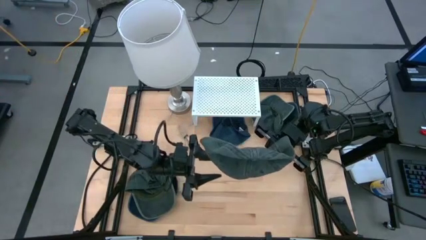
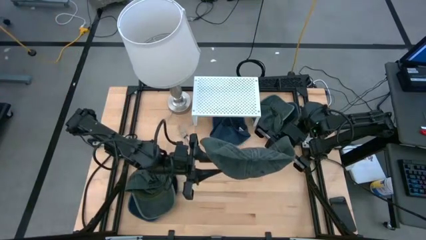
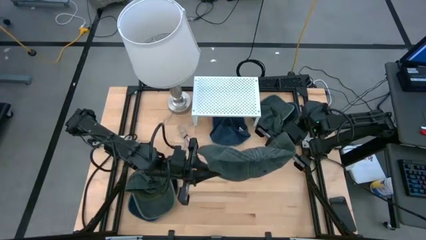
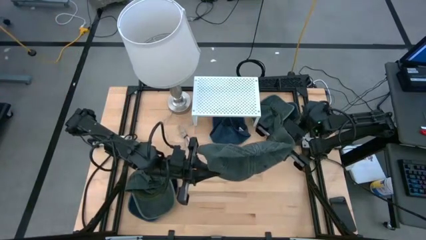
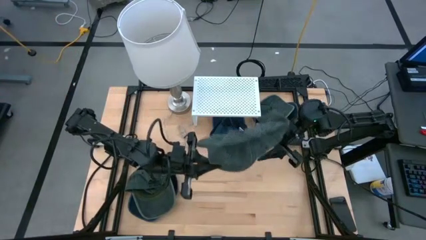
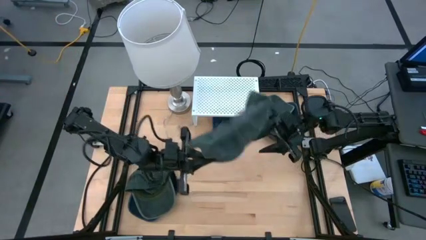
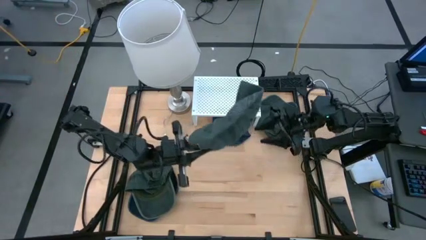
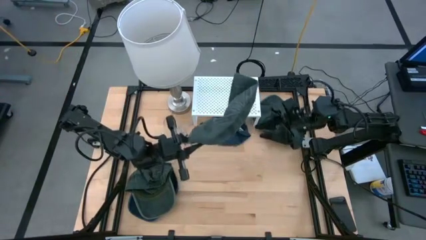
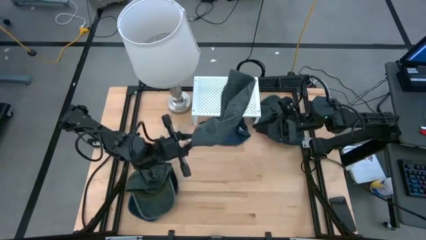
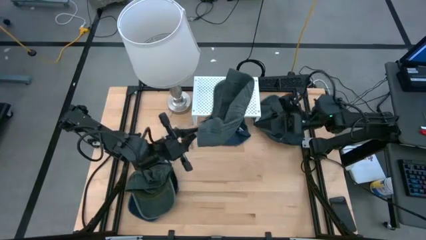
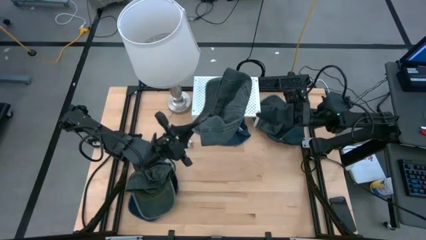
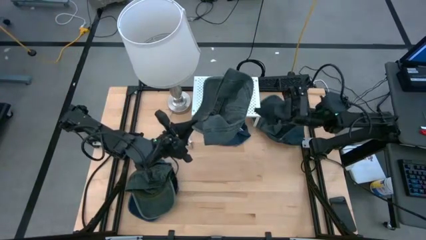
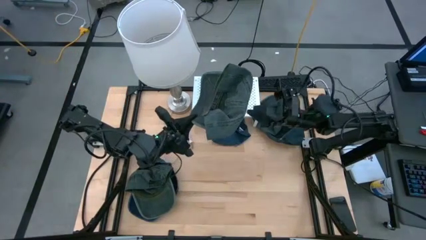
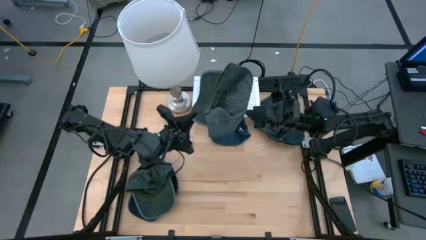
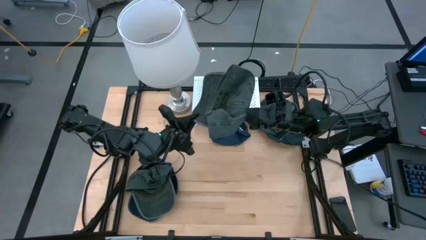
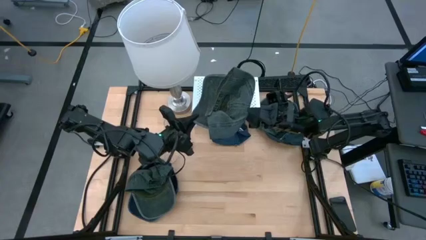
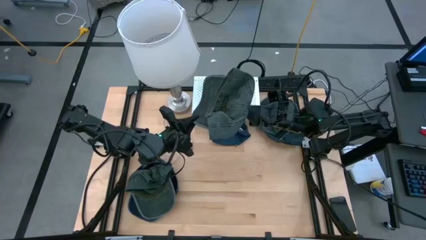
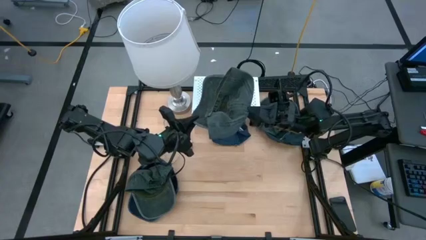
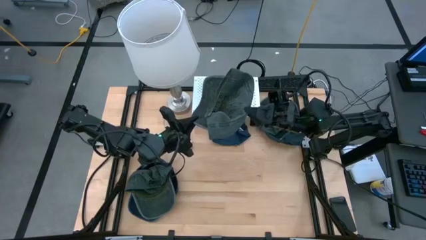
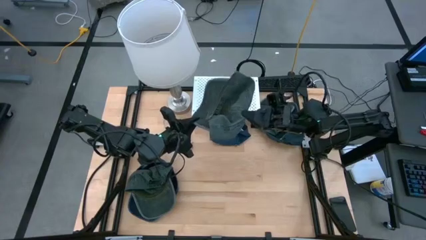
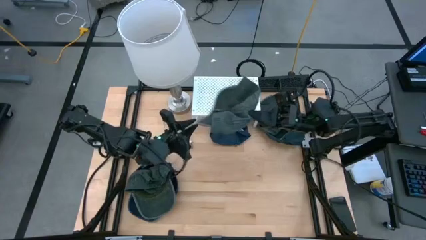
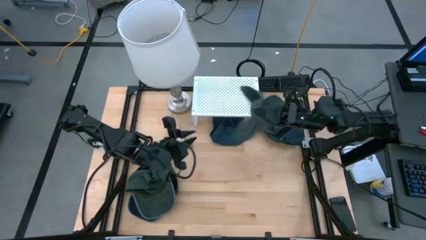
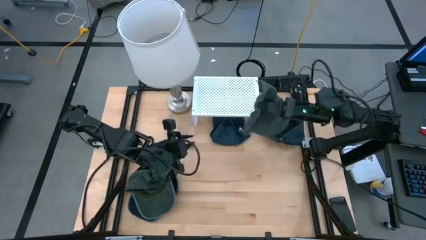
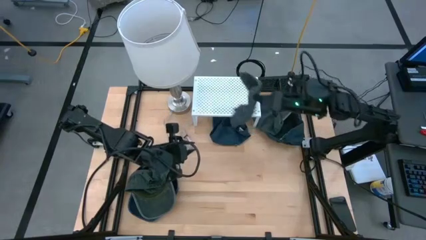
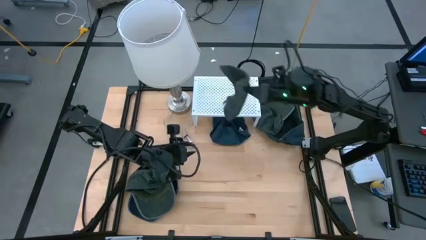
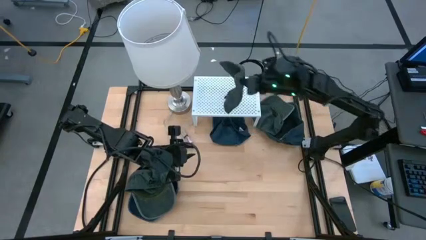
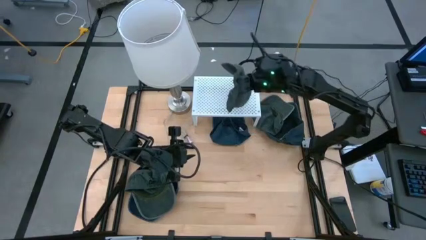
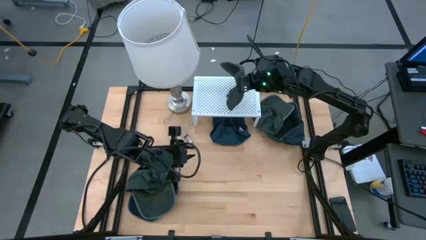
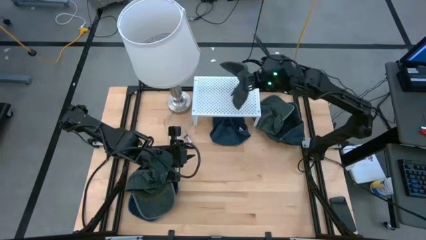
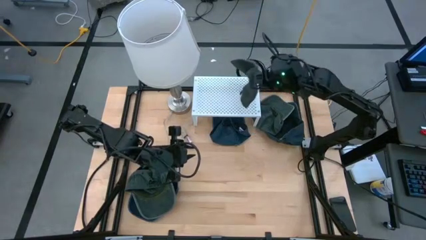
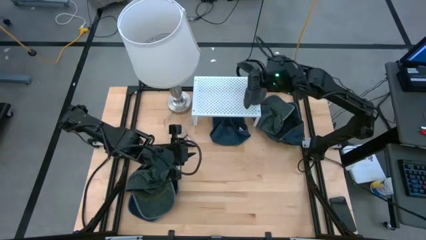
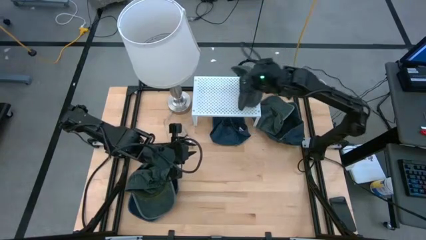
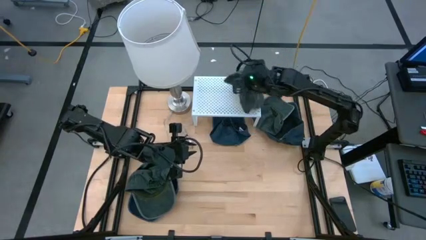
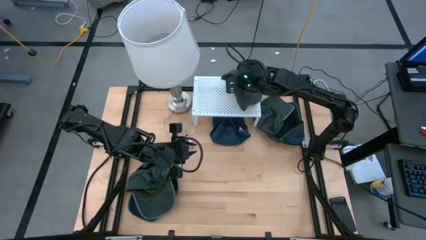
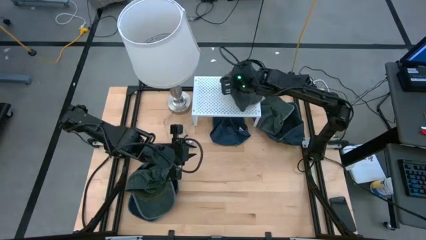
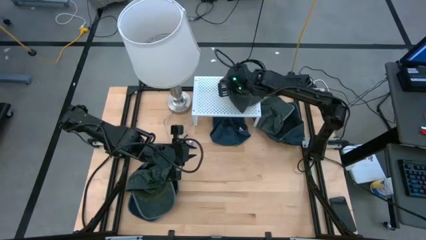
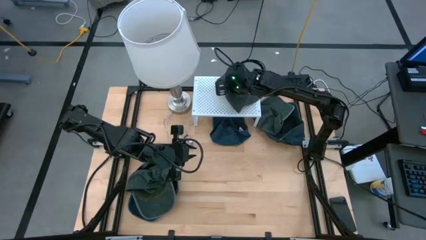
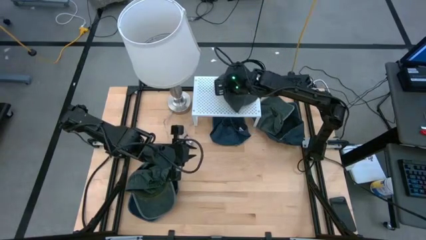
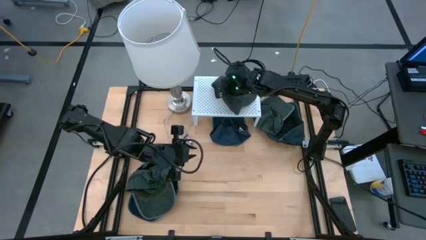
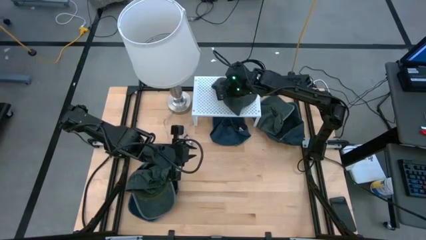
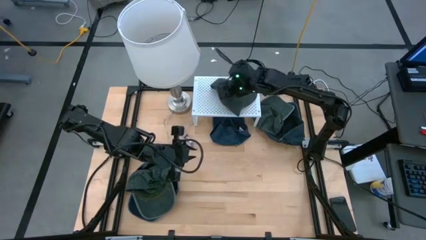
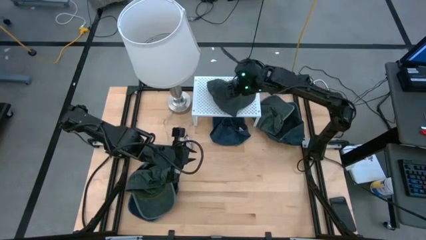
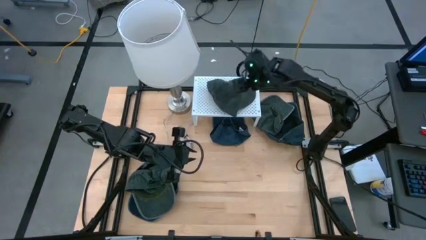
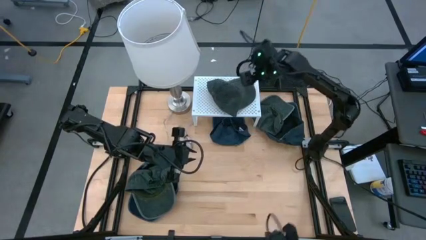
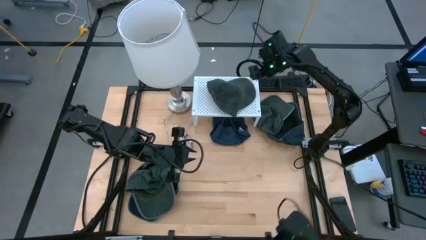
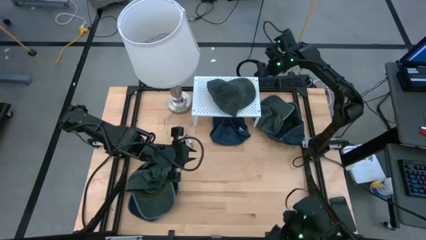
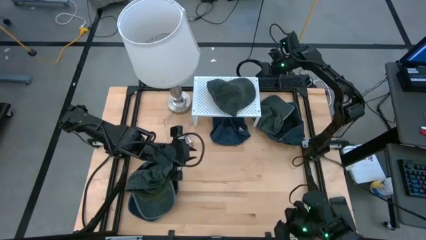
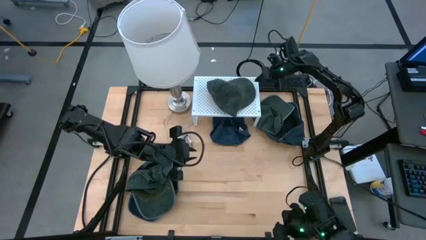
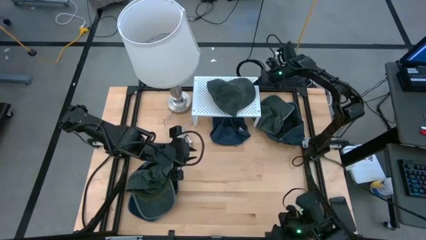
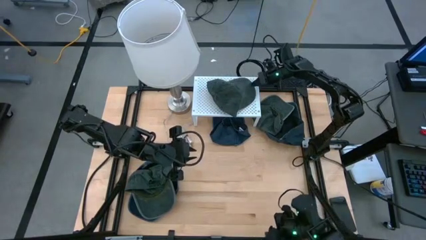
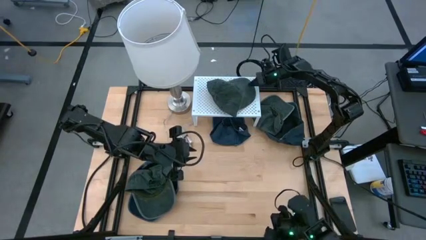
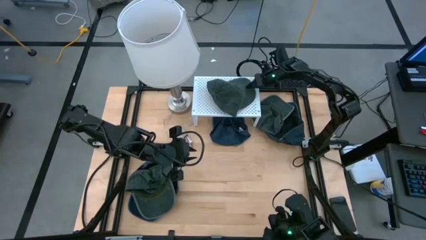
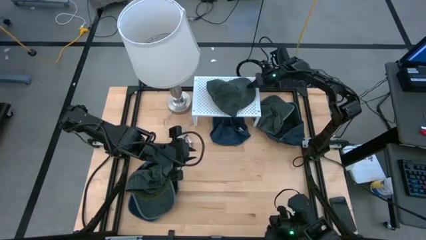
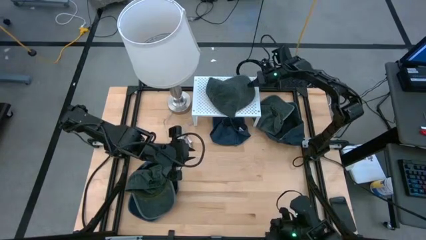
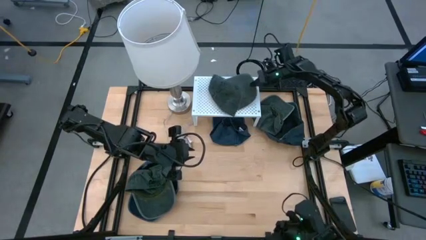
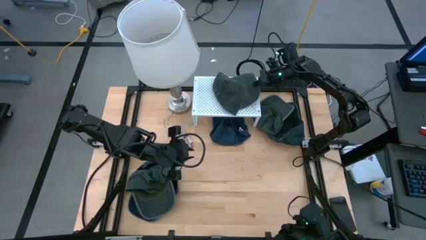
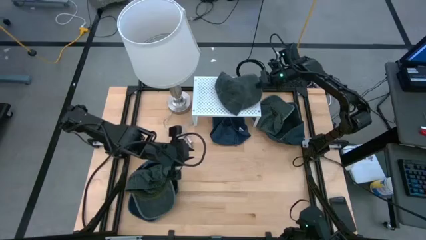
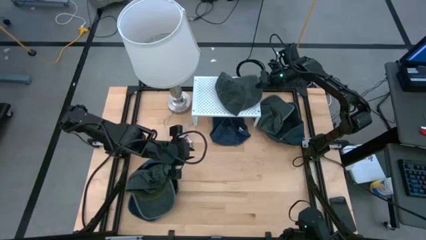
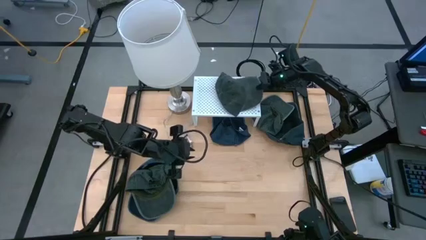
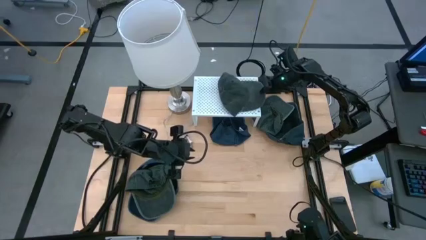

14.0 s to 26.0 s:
Task: Pick & Place hat
Put the bottom right gray cap on the shelf
